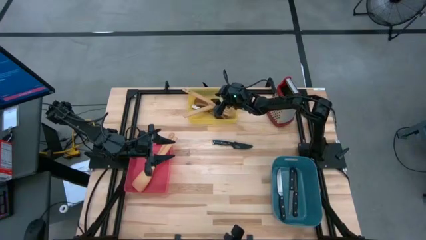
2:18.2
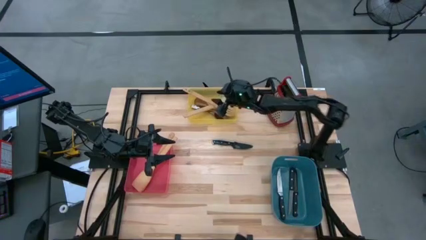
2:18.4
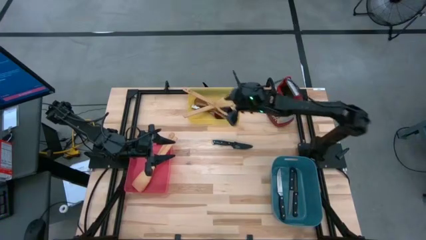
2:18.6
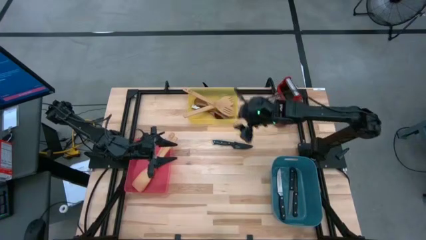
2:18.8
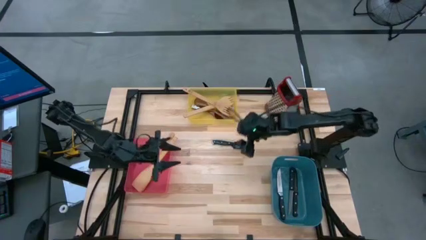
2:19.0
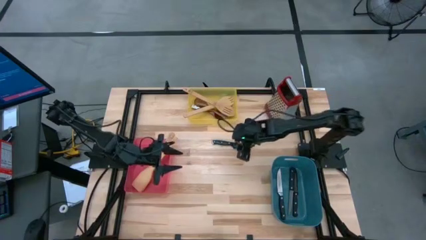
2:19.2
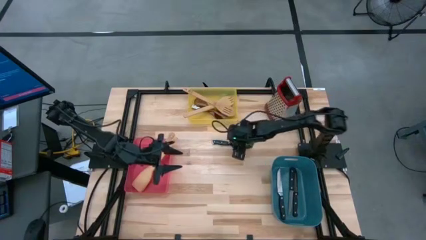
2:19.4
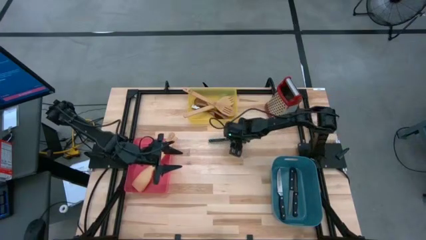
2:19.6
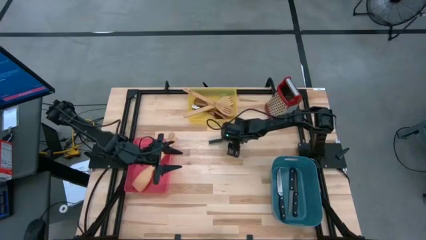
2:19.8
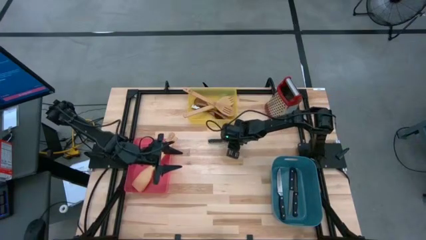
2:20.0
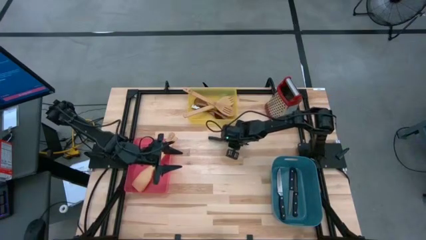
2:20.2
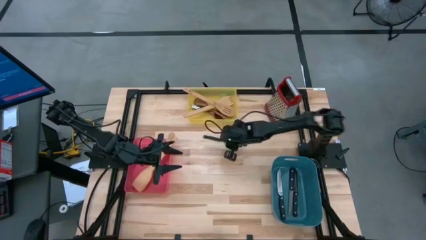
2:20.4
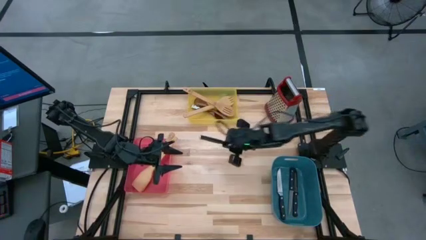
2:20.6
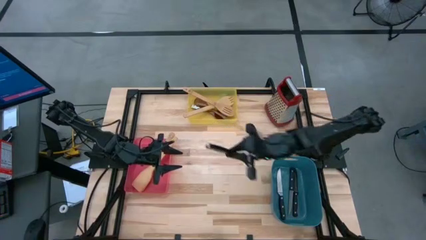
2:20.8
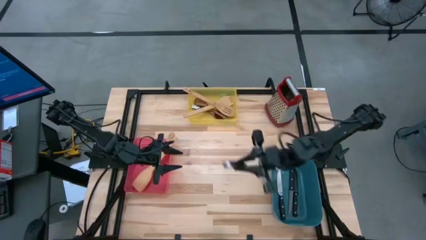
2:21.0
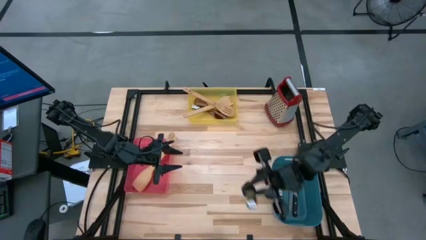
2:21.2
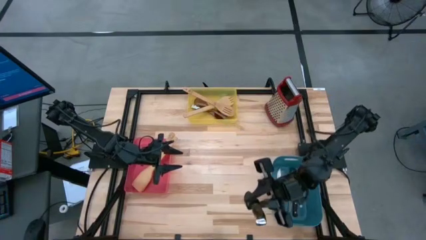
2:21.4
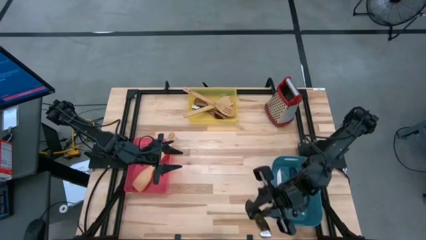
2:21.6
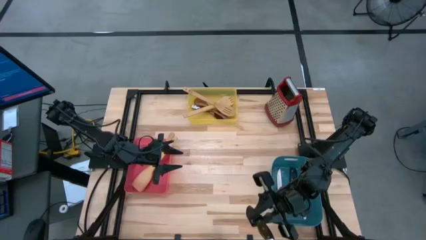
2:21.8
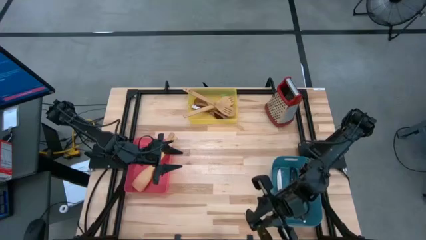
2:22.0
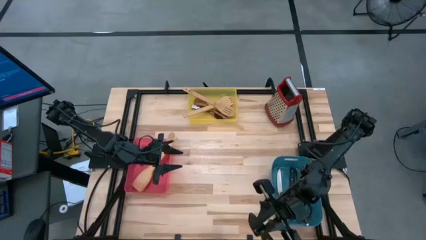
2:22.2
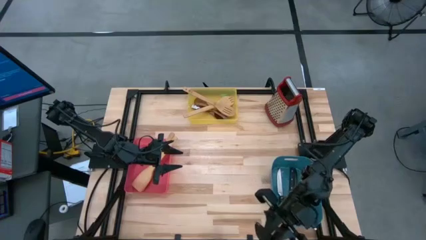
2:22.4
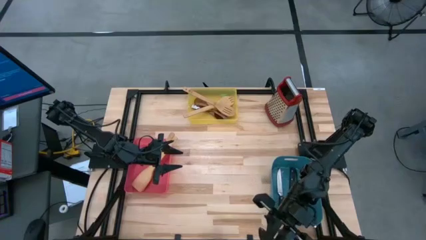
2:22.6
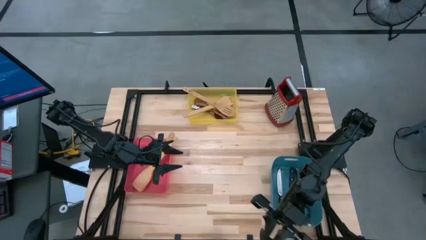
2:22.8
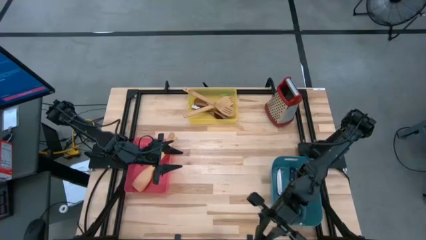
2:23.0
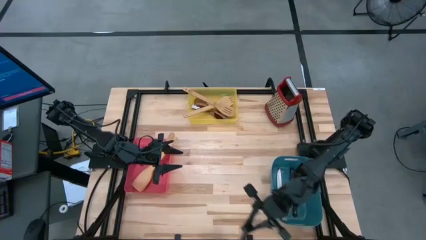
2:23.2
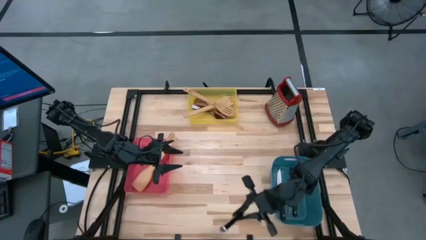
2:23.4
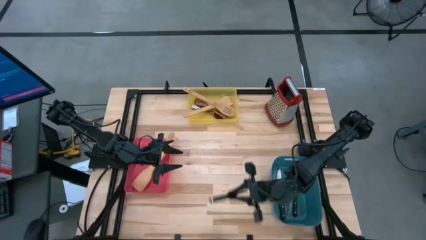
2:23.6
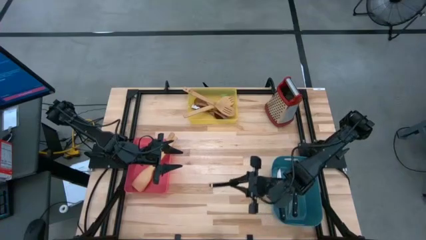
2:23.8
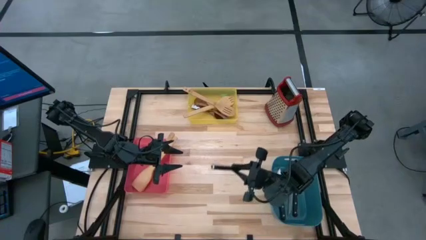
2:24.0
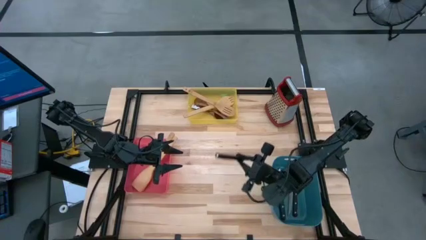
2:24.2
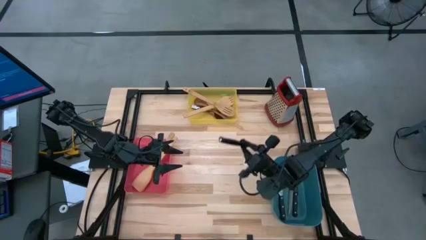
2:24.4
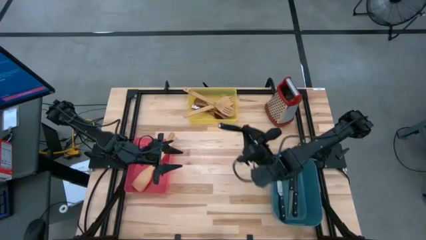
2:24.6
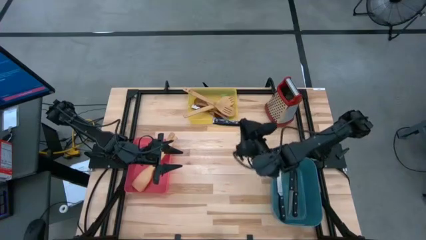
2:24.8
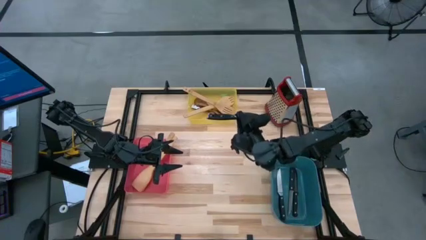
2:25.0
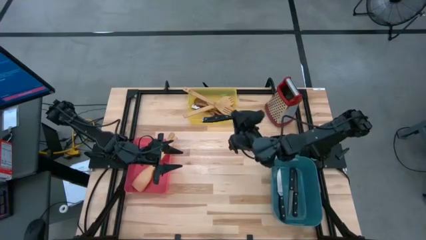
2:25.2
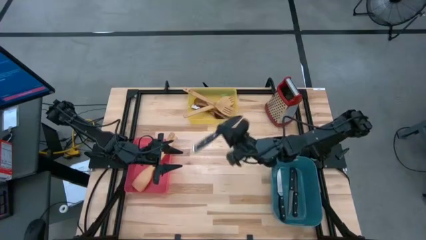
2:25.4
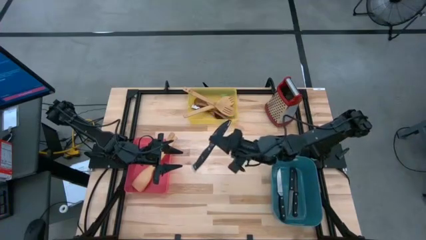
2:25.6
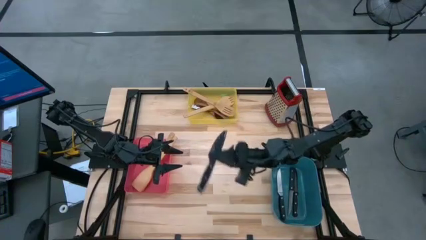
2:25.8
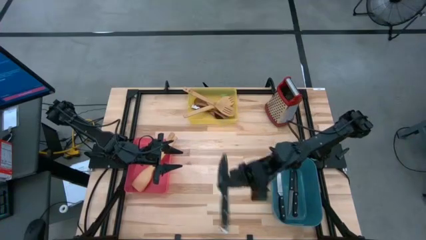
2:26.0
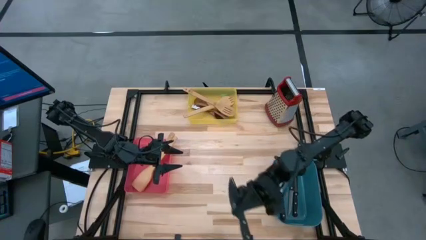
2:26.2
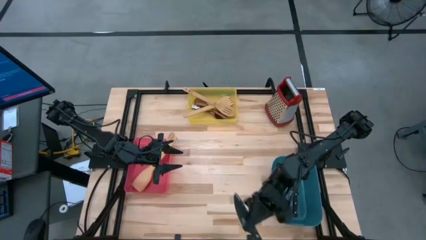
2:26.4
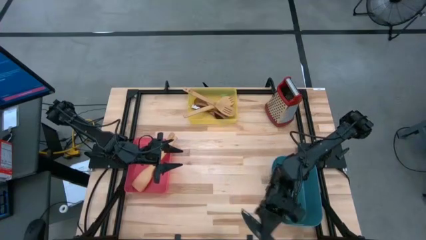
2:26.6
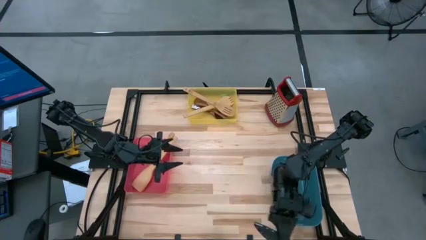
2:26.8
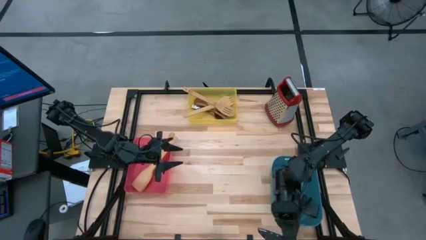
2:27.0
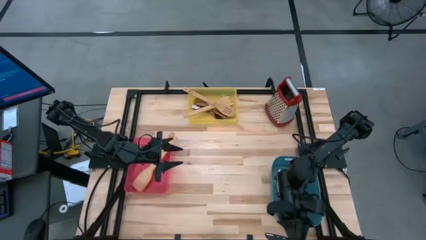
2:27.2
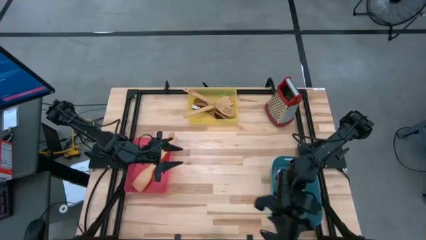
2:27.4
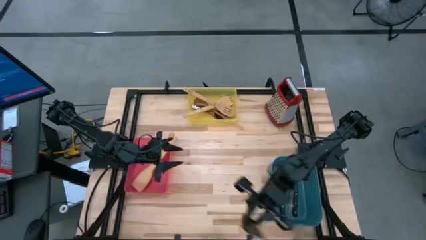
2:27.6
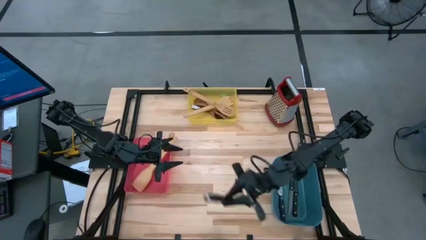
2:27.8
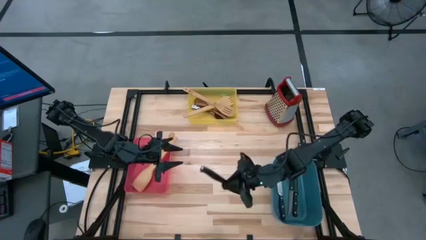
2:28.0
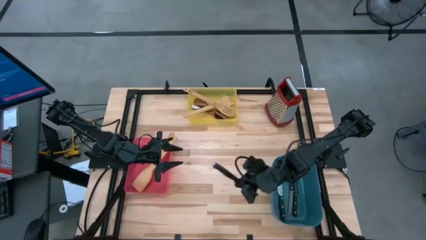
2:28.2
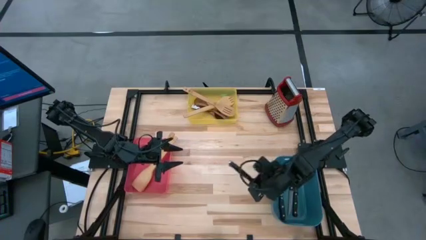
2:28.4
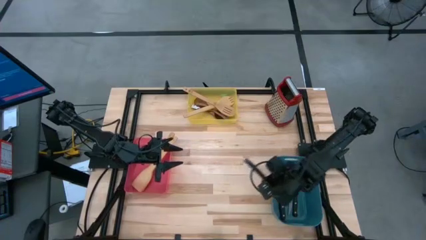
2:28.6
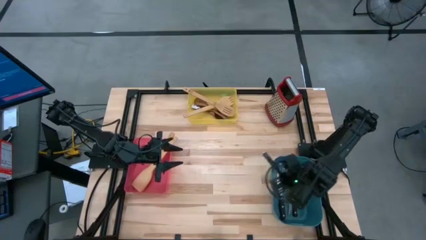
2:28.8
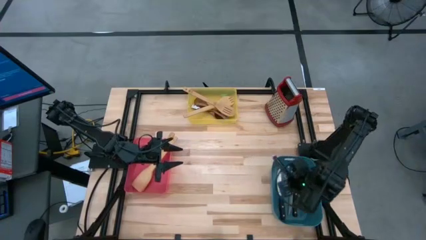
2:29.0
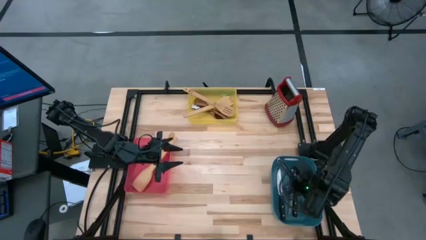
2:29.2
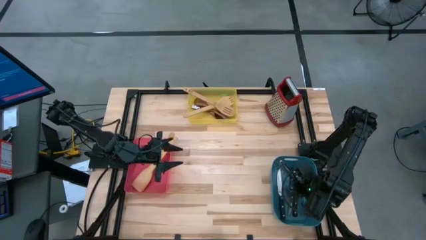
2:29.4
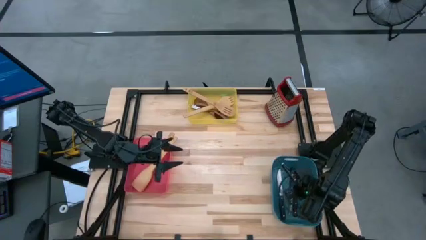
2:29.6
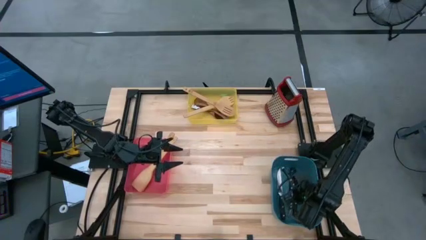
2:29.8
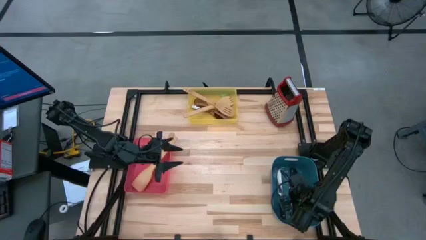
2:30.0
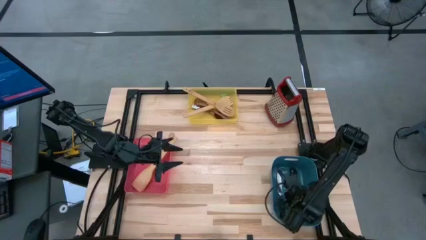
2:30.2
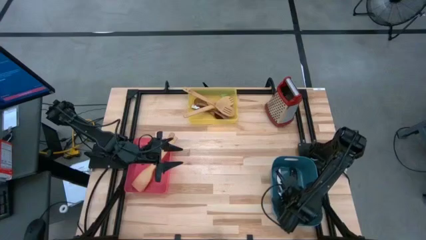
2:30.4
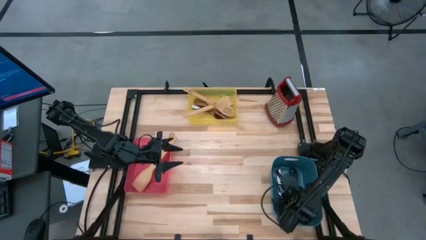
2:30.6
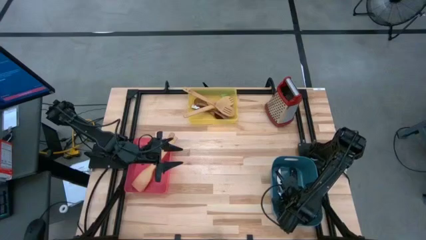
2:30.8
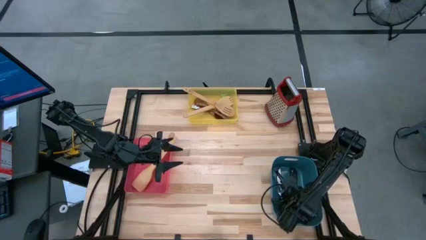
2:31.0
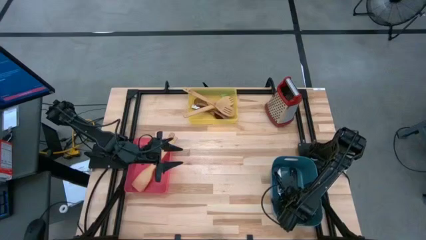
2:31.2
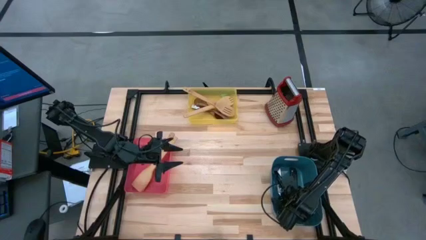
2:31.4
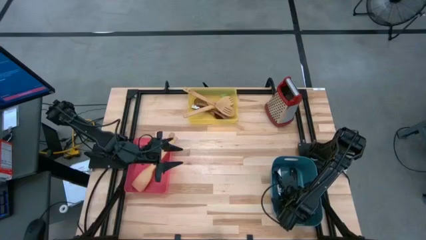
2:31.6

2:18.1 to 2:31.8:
Task: Pick & Place Kitchen Items
Put the black knife into the blue bin

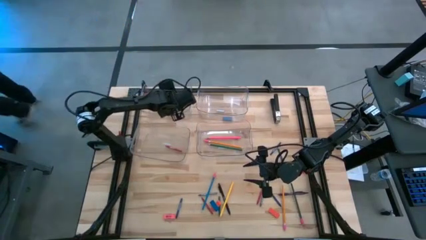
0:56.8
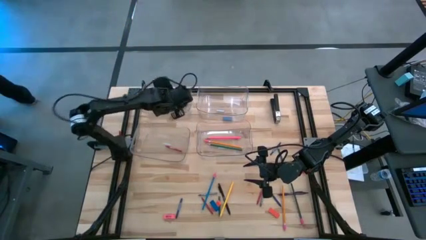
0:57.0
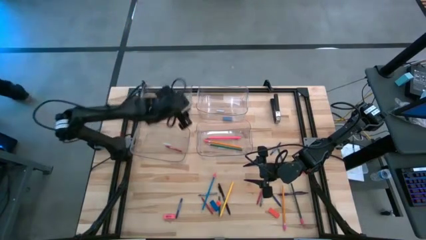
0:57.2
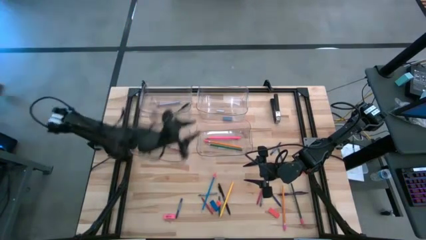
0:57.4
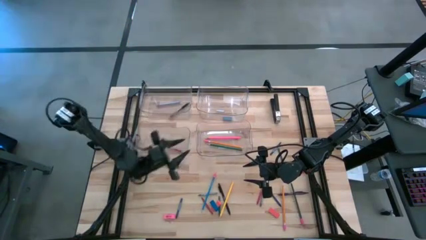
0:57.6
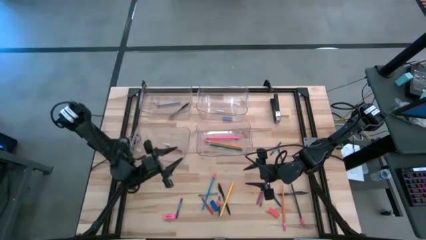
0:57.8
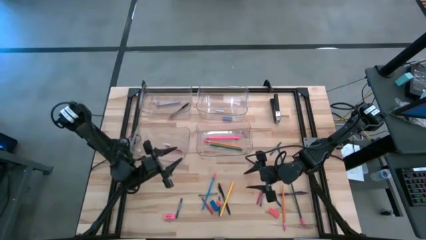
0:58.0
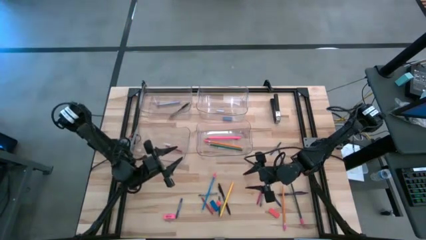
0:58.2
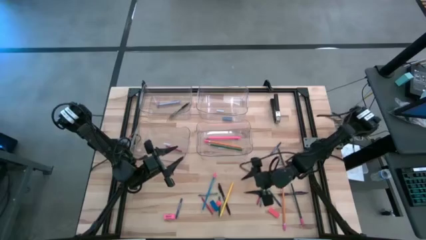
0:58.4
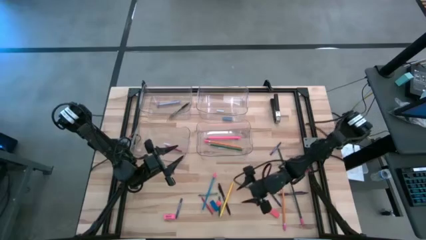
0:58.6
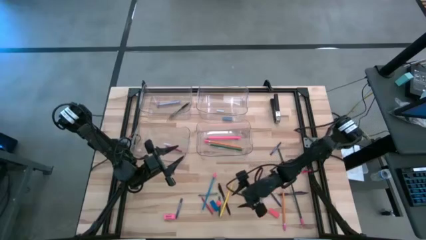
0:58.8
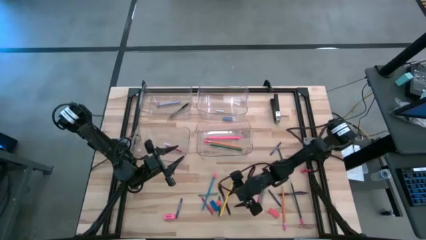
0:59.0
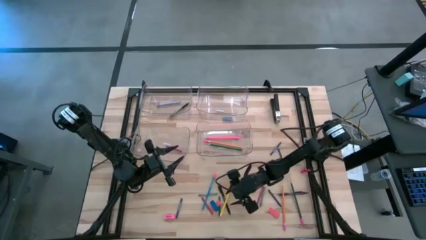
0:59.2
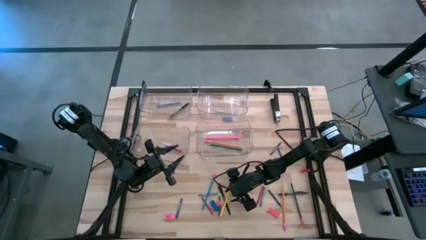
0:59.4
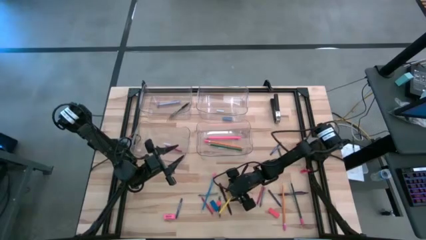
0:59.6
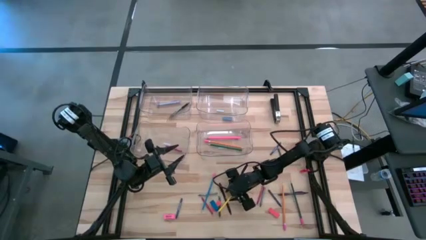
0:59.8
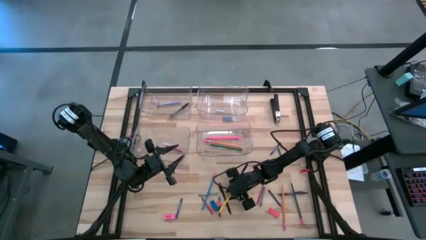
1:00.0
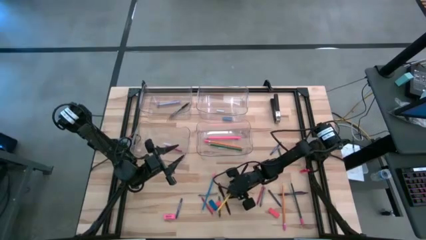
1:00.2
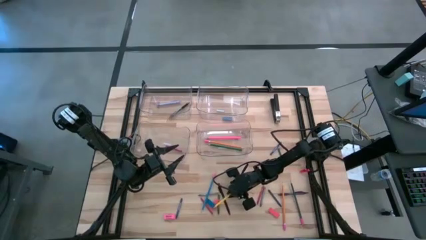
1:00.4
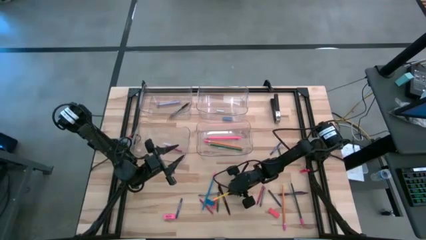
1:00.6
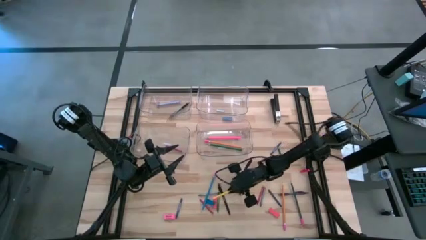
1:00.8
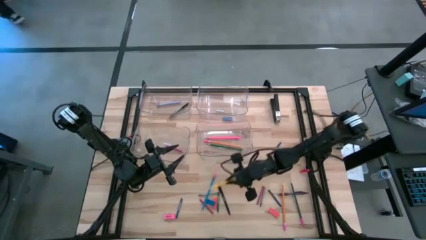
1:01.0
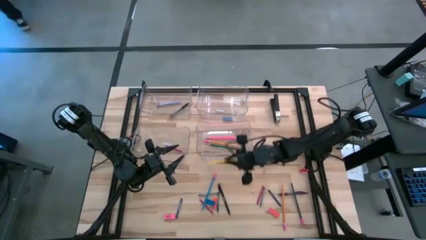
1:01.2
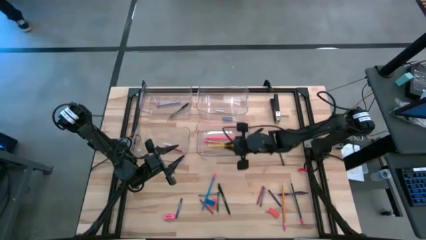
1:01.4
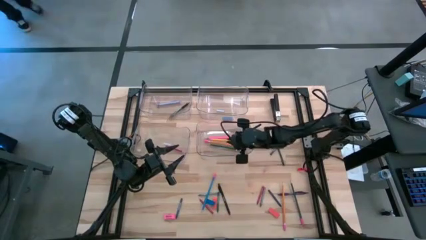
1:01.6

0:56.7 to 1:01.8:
Task: Sort crayons/erasers/pens/pencils in bins
Put the yellow pencil into the bottom right transparent bin
